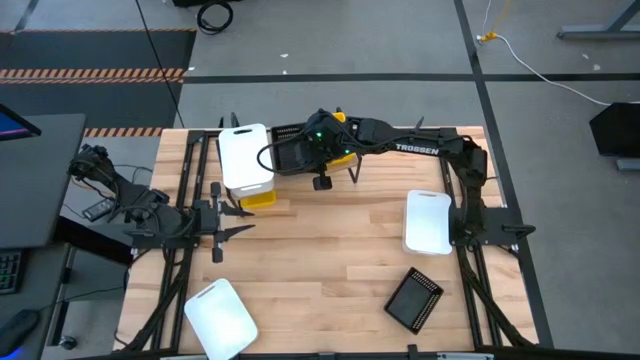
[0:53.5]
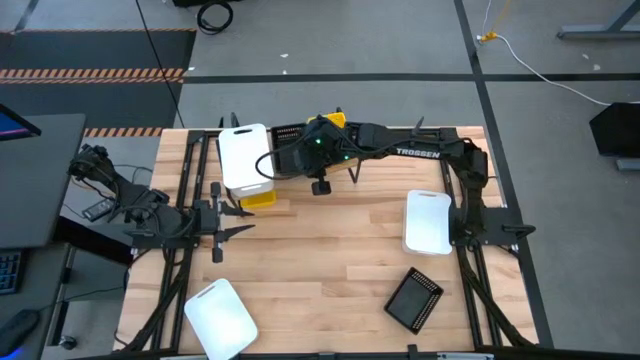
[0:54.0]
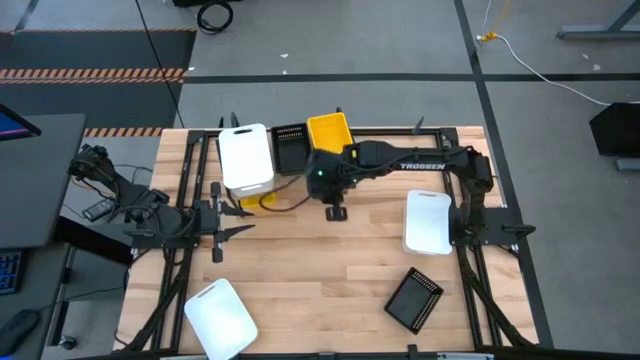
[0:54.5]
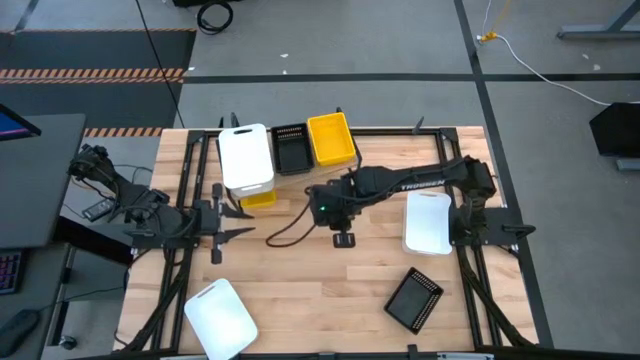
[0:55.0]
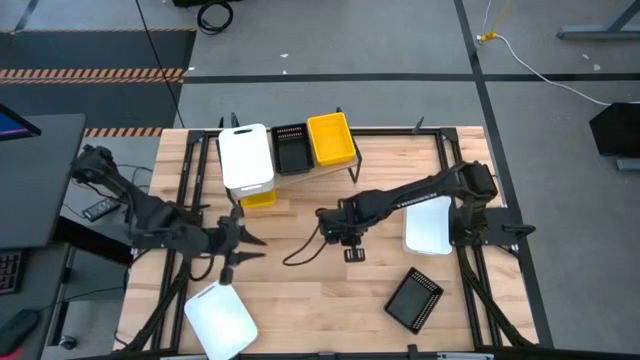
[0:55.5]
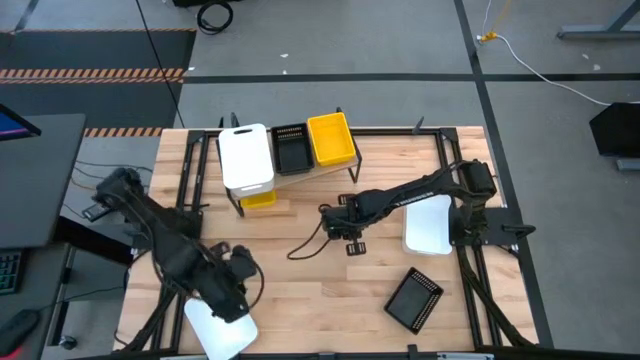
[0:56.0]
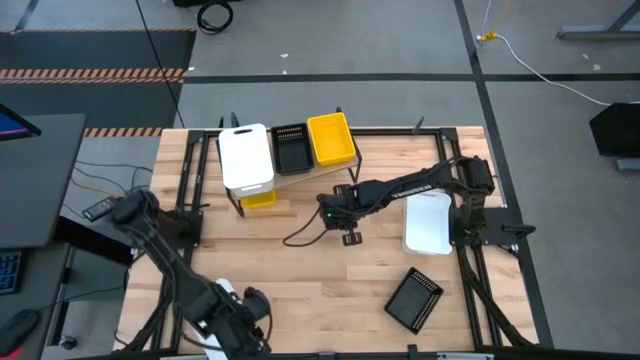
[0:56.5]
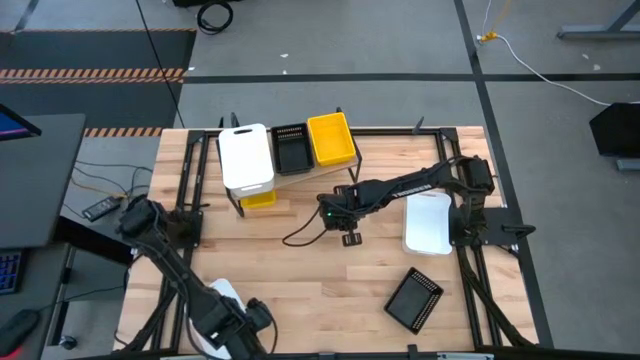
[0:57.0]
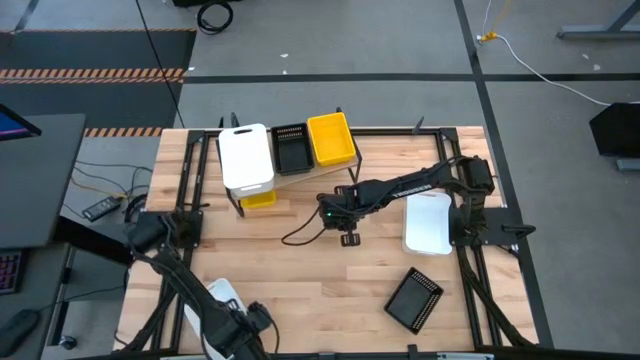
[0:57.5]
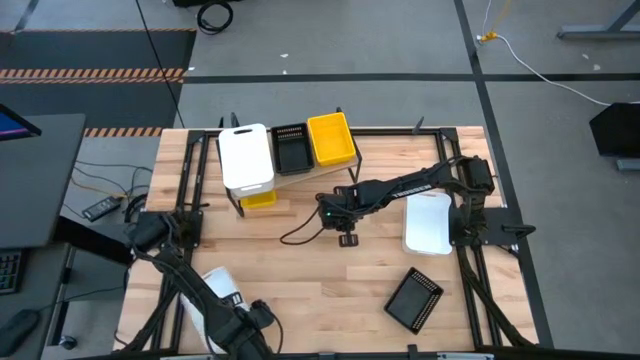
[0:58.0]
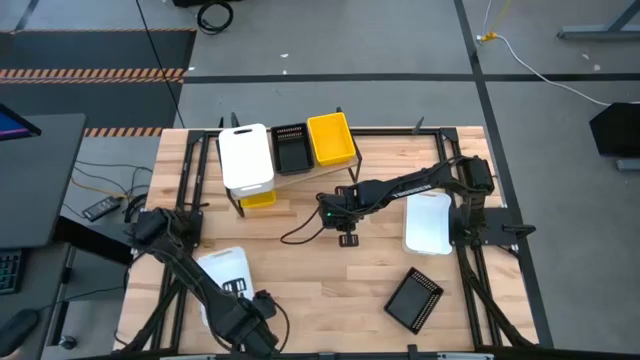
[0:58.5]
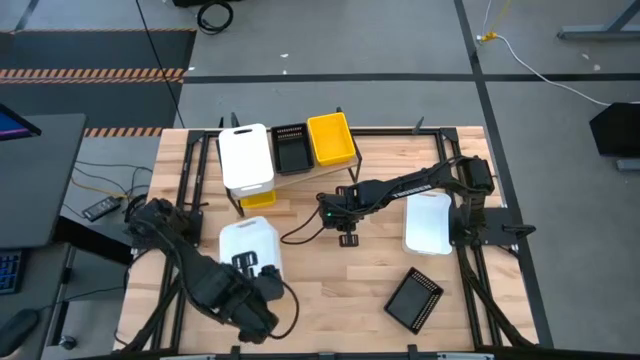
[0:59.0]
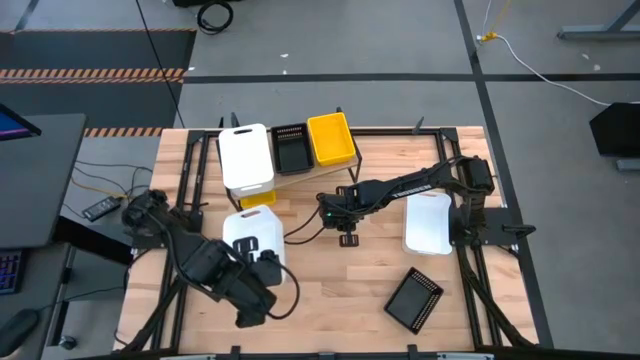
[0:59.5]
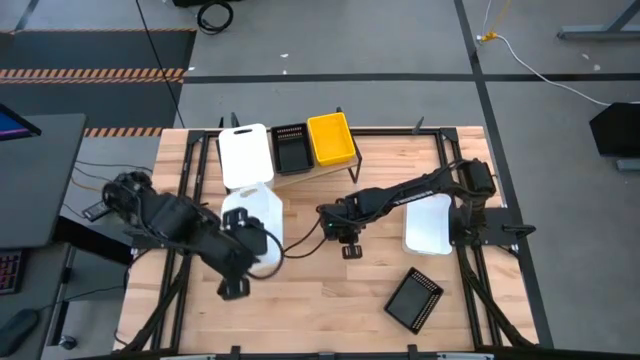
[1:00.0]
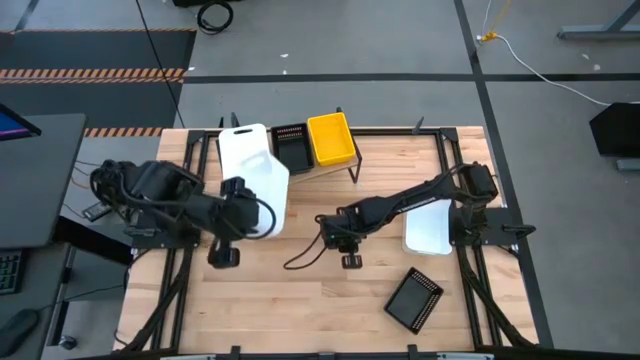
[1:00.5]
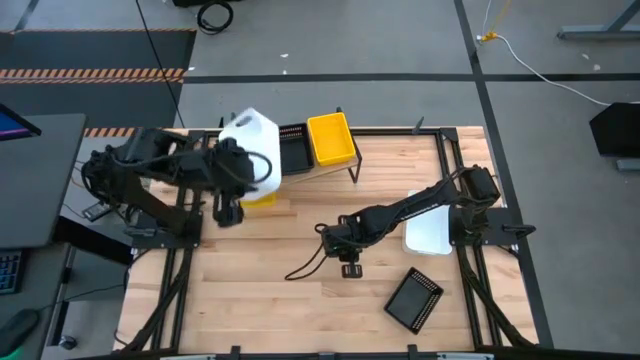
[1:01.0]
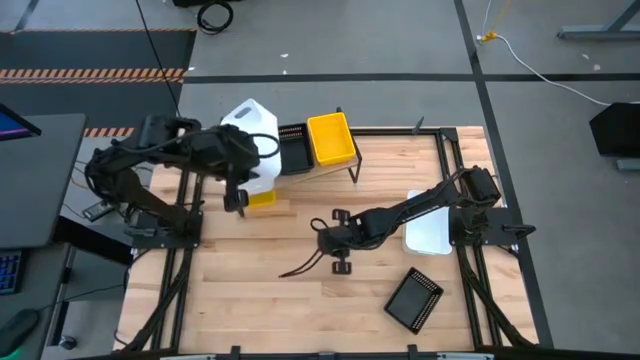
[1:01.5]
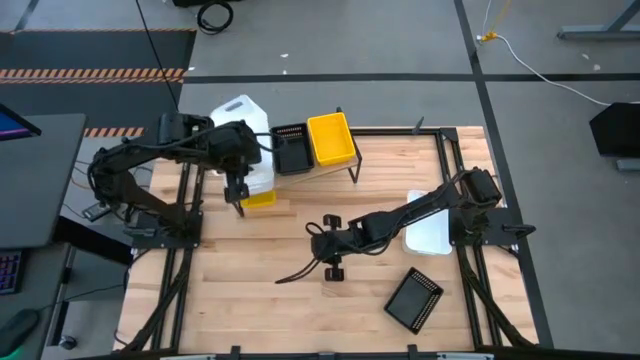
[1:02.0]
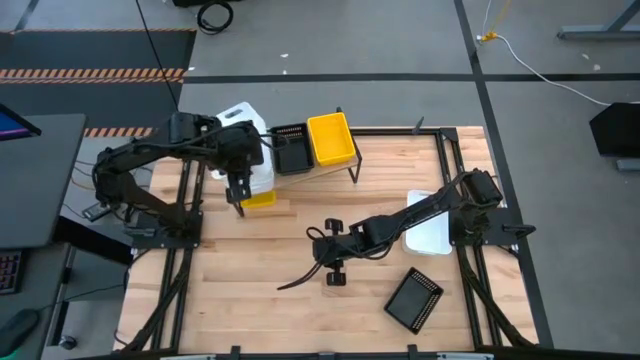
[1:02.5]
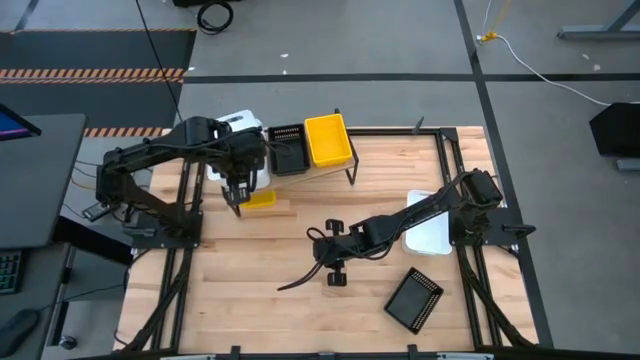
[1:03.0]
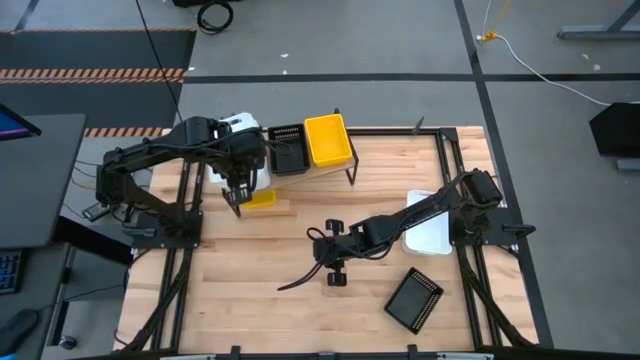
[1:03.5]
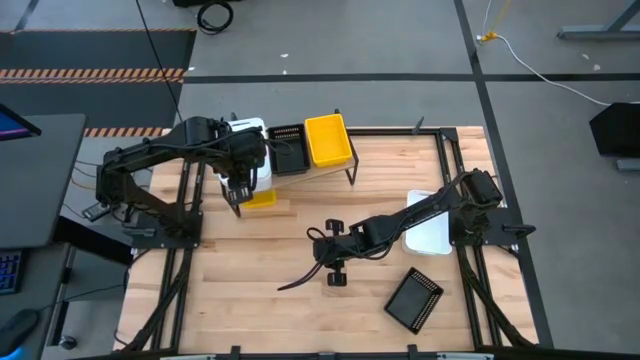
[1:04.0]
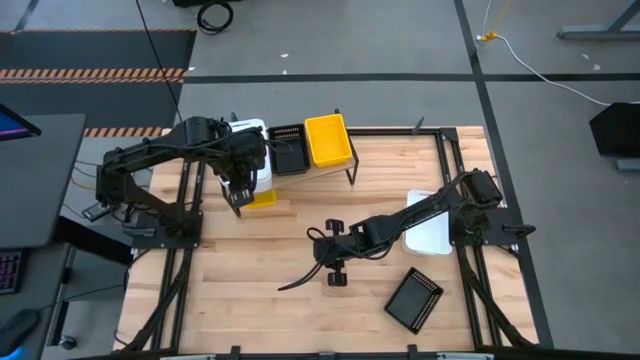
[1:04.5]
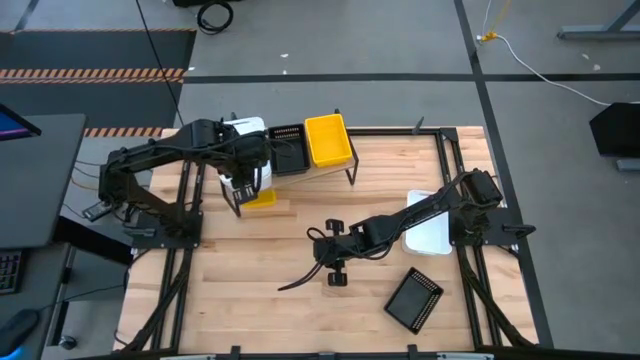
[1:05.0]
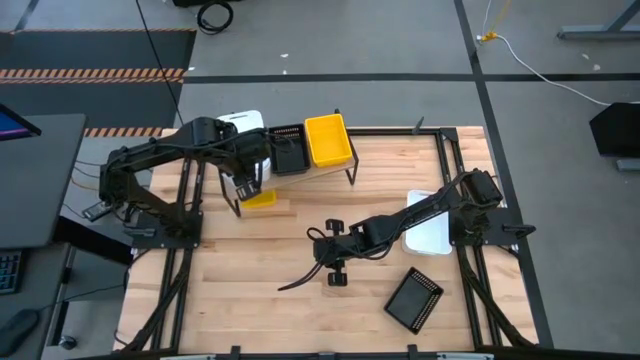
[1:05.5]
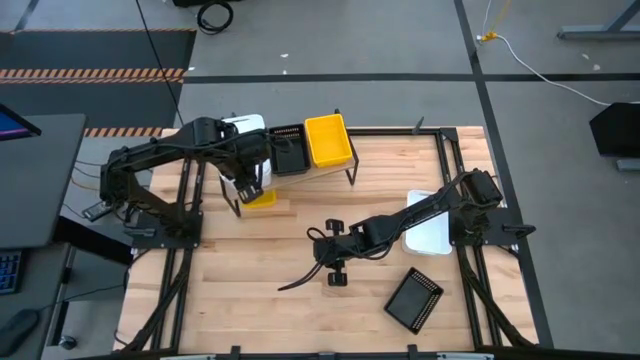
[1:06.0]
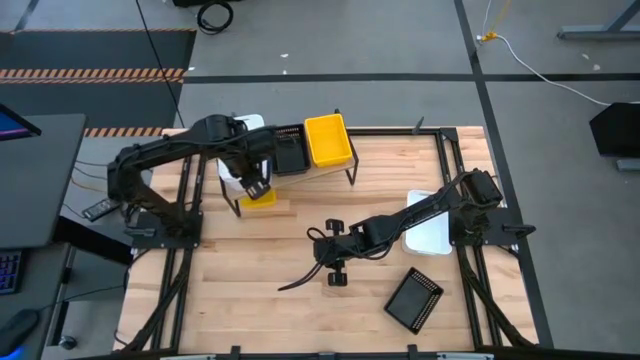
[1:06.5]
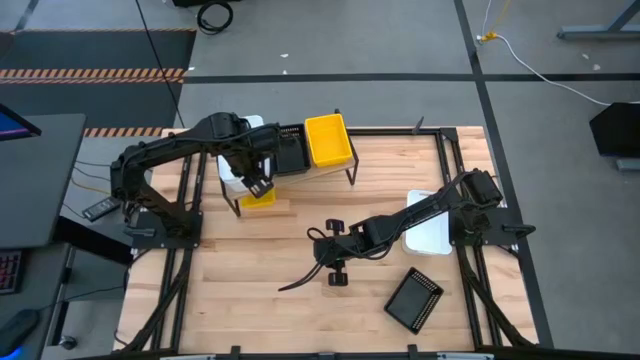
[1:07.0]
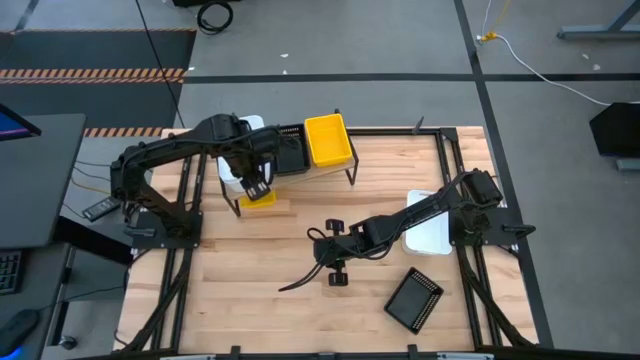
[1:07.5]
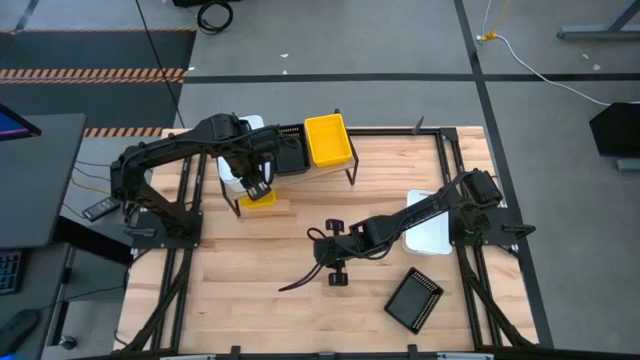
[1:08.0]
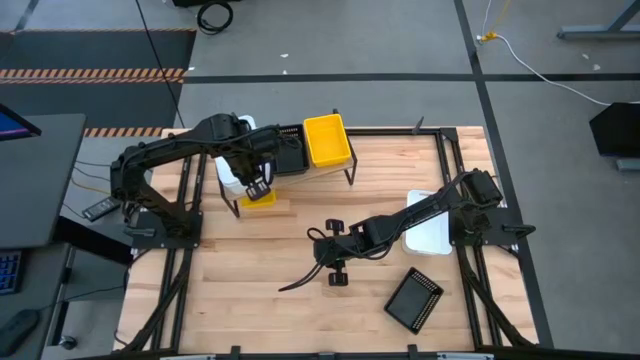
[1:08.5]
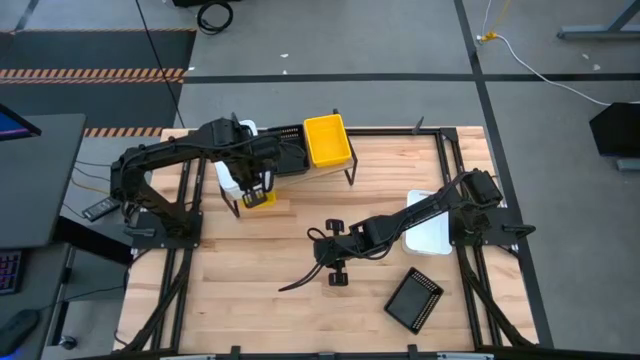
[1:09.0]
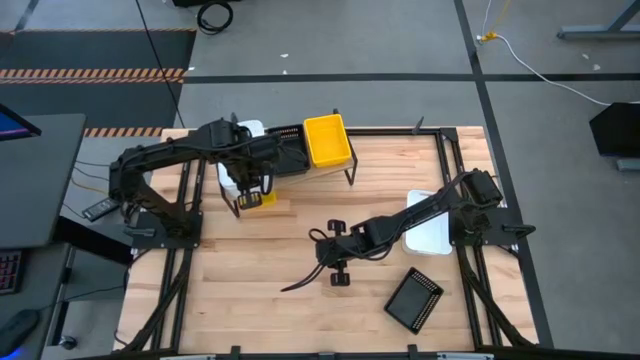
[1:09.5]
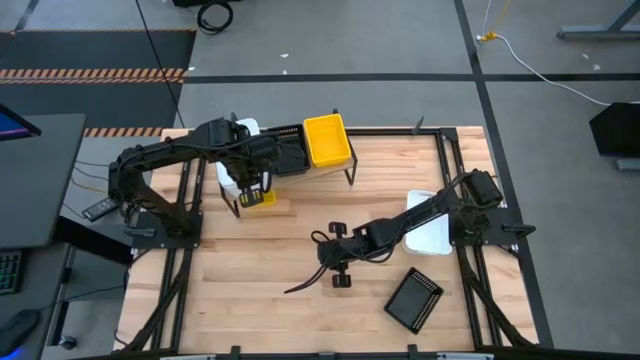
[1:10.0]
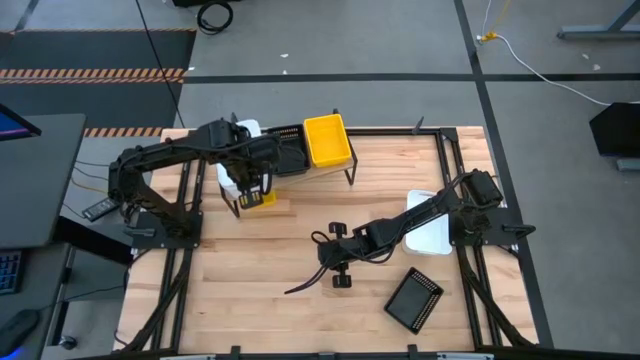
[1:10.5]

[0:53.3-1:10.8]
Task: Stack baskets on shelf by color
Stack the left white bin on top of the other white bin on the shelf
